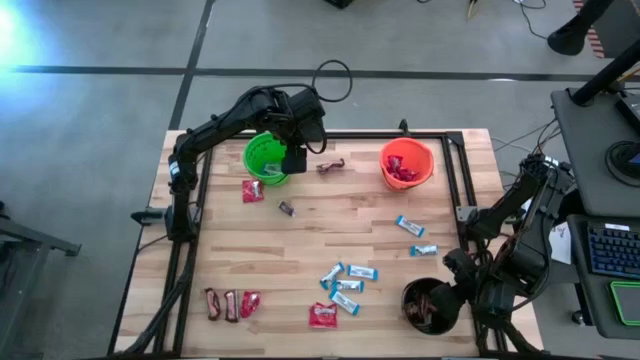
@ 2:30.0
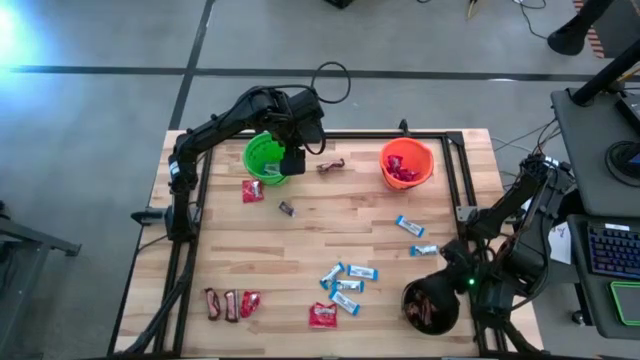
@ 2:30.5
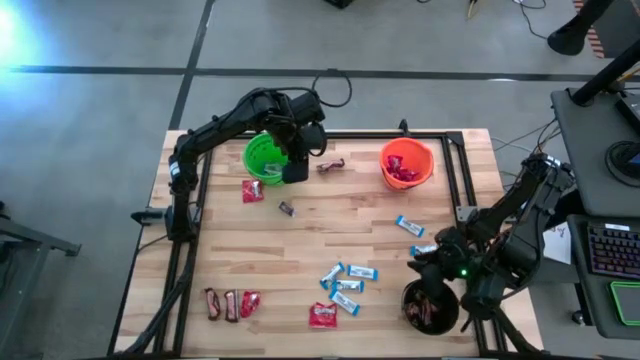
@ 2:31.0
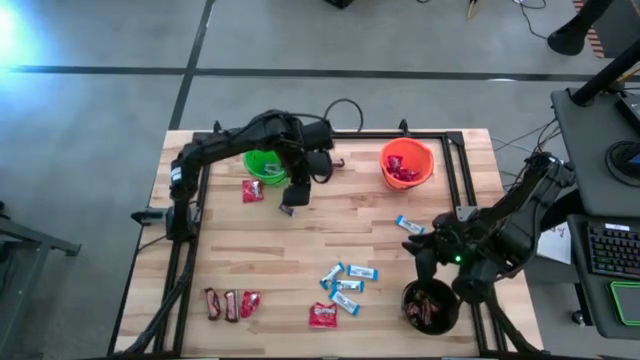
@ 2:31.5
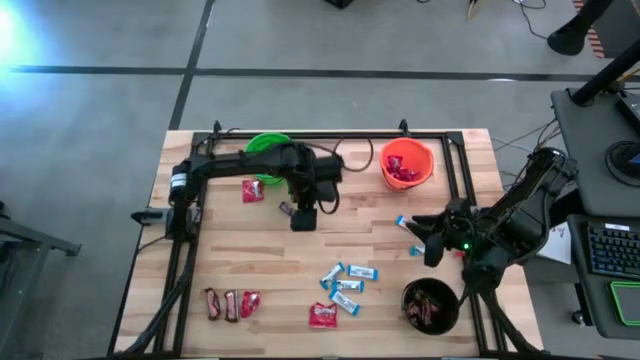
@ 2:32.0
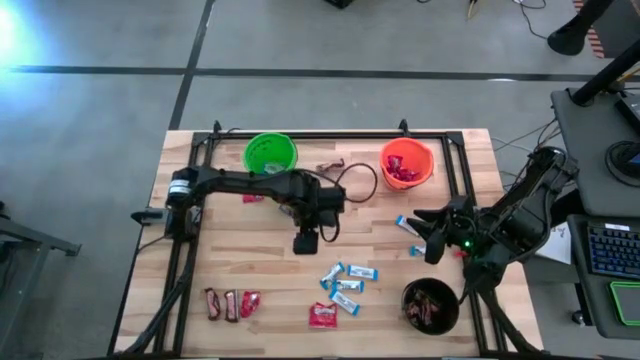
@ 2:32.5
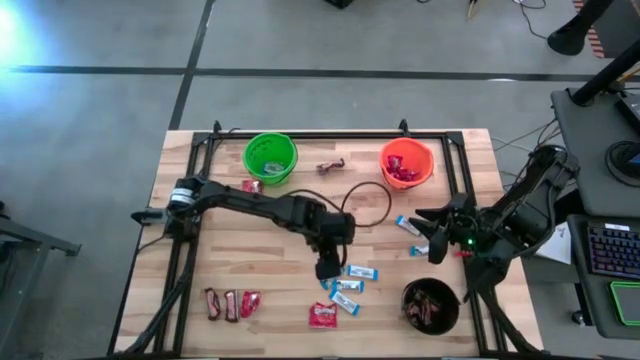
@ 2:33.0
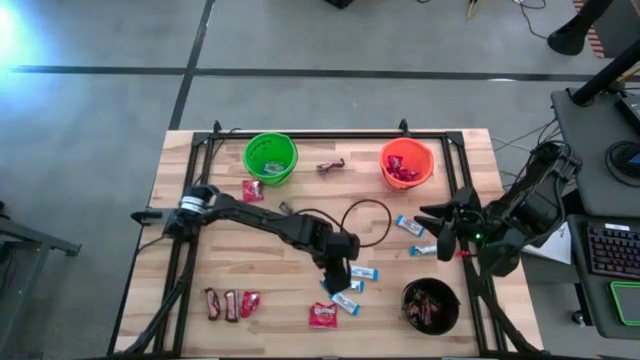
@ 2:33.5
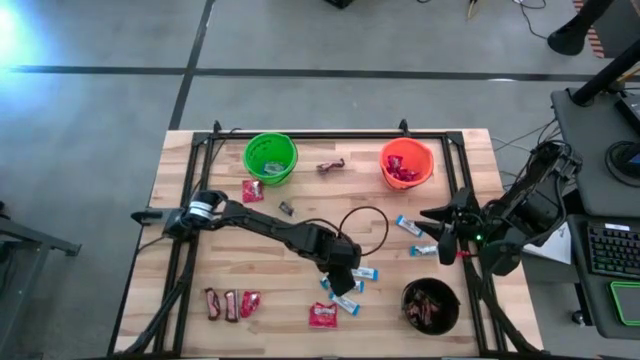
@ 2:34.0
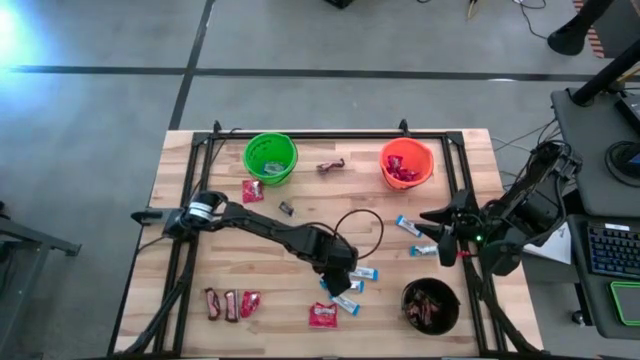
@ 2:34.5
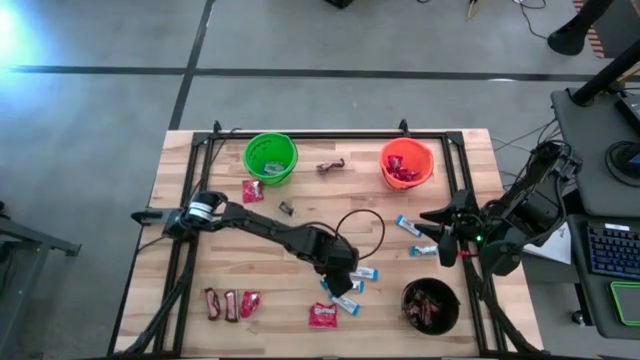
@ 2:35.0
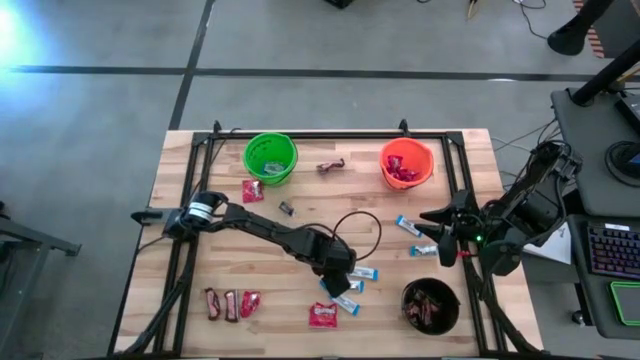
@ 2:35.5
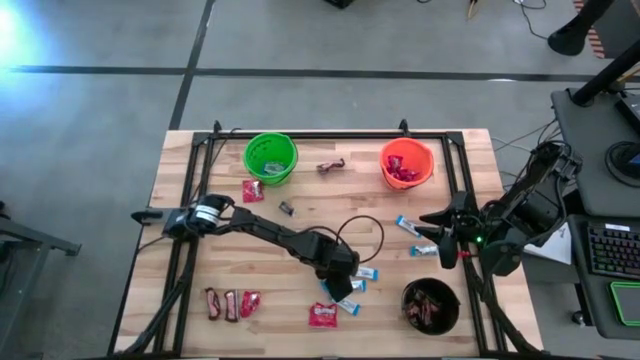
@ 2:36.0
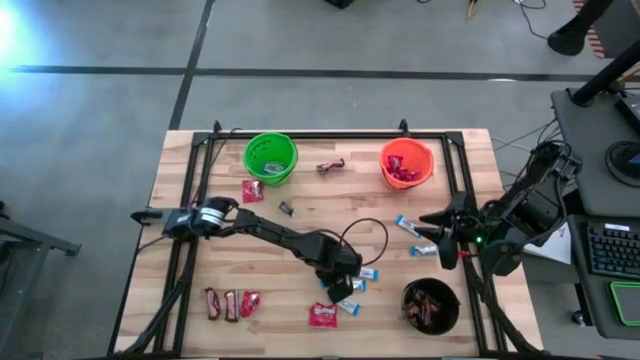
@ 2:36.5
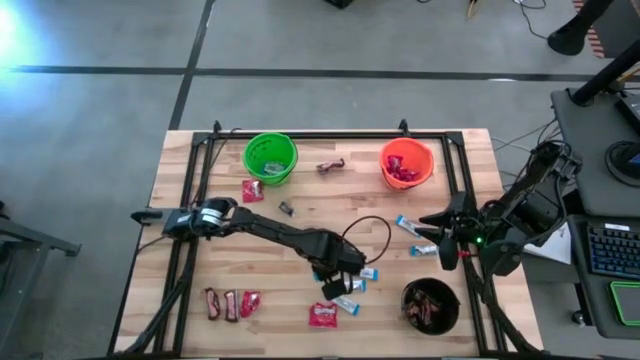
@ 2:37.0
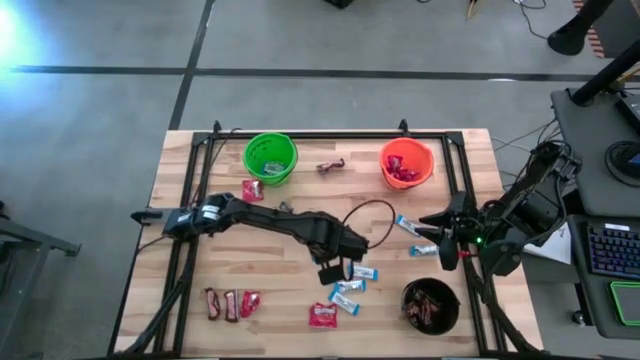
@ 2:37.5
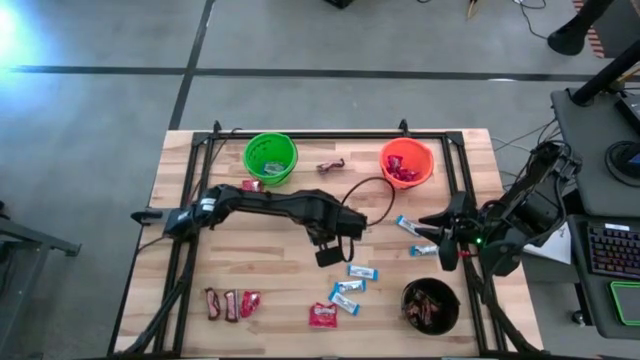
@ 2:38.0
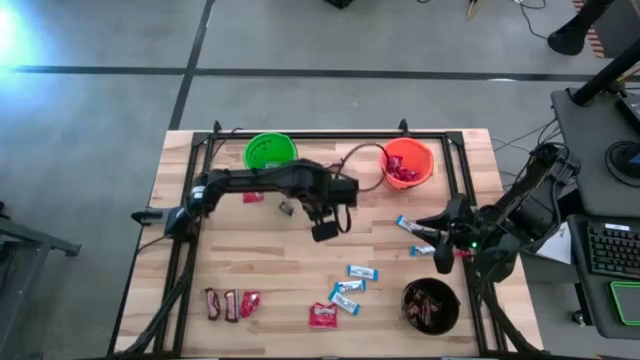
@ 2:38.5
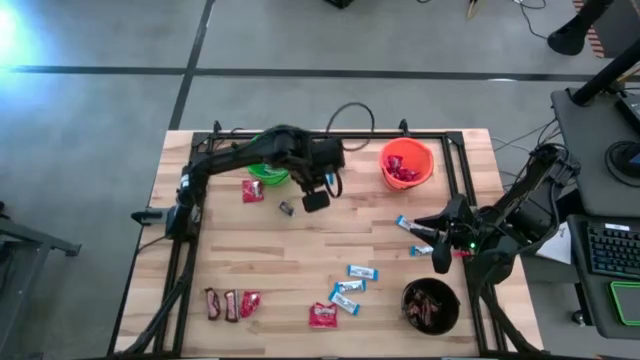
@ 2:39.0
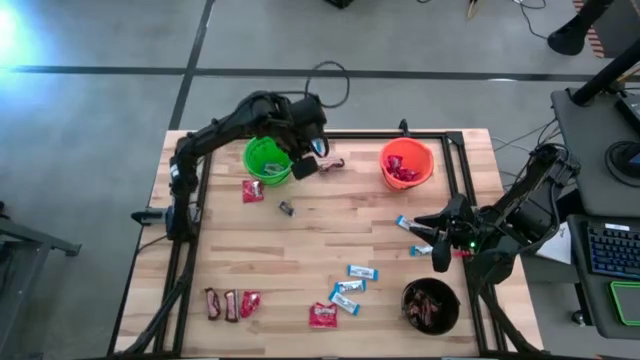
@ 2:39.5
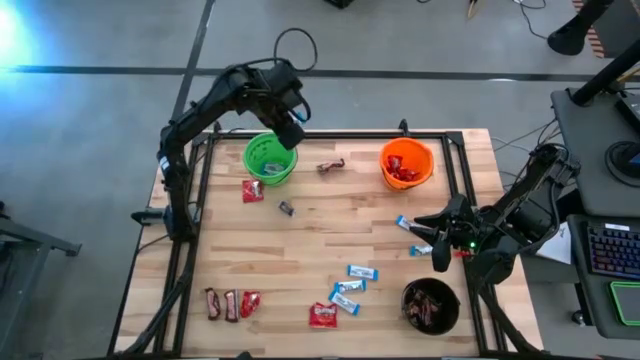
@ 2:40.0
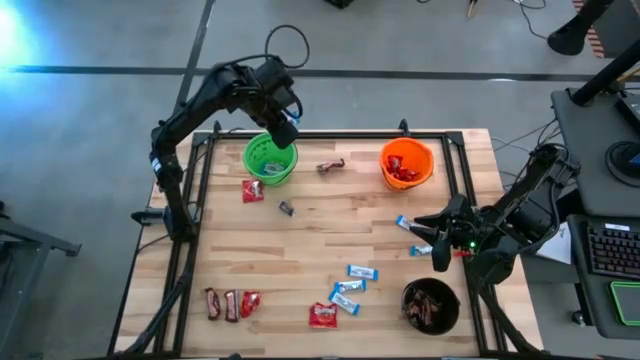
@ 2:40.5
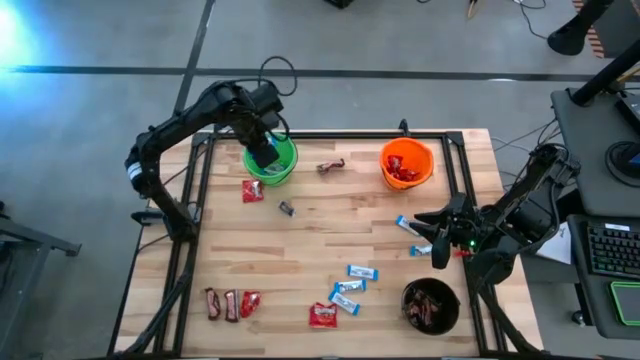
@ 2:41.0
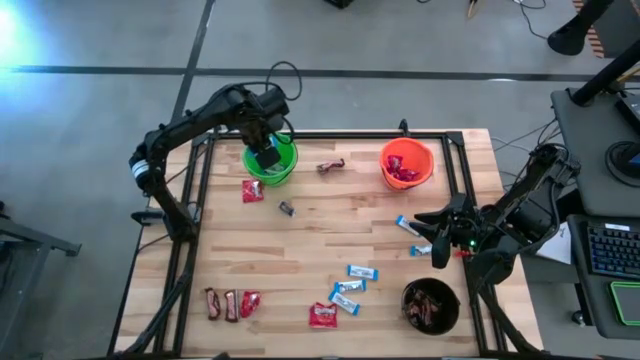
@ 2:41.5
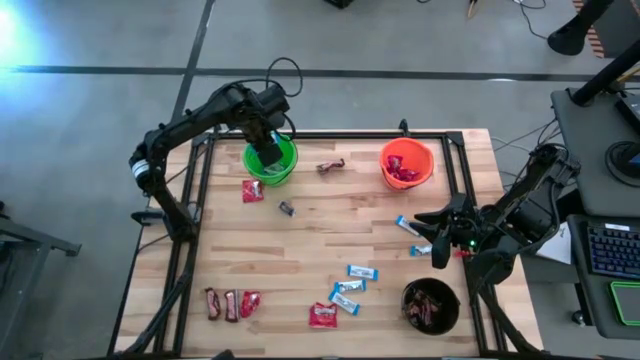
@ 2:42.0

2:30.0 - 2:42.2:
Task: Sort candy
Put the white candy into the green bucket

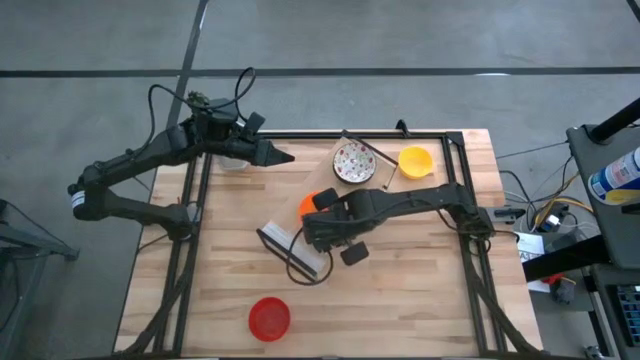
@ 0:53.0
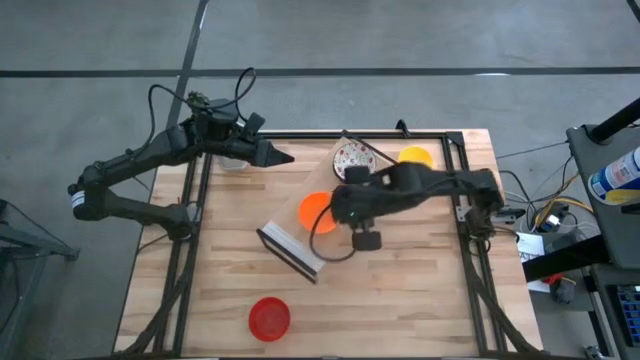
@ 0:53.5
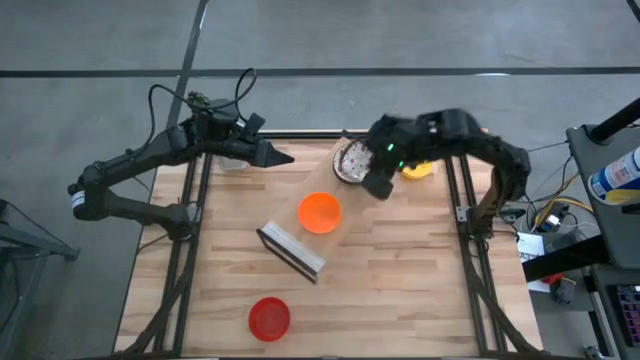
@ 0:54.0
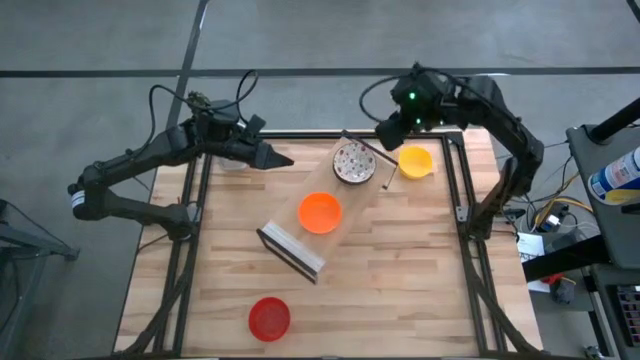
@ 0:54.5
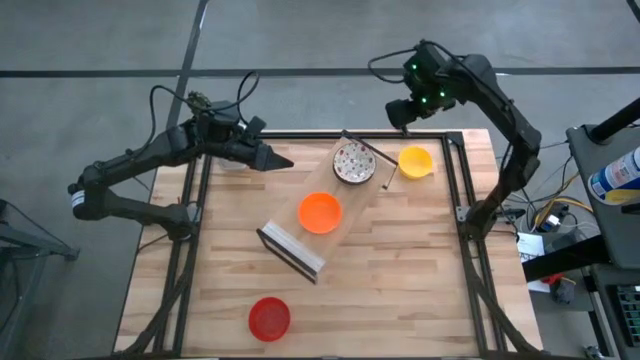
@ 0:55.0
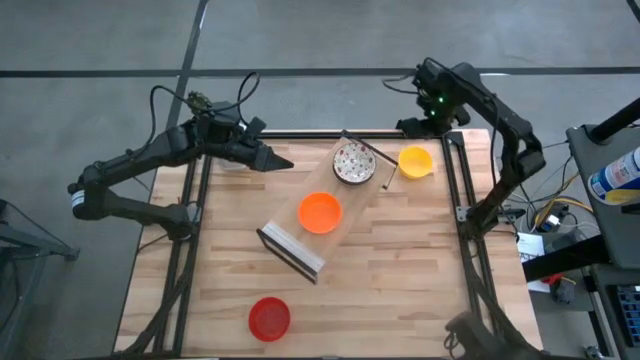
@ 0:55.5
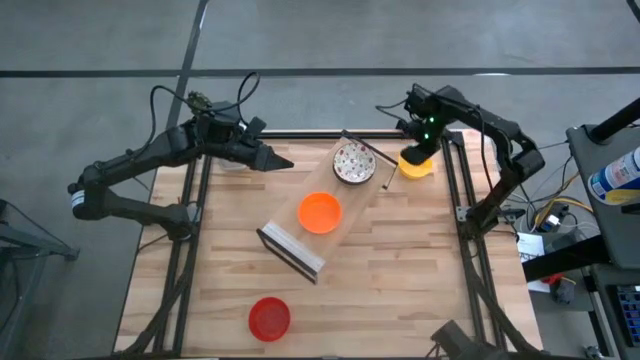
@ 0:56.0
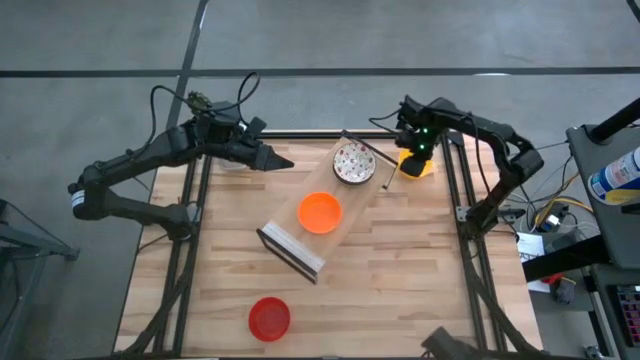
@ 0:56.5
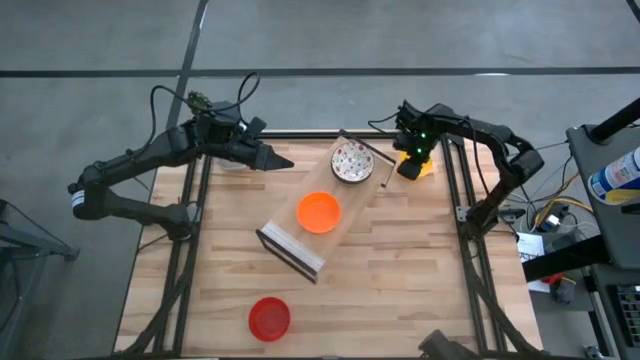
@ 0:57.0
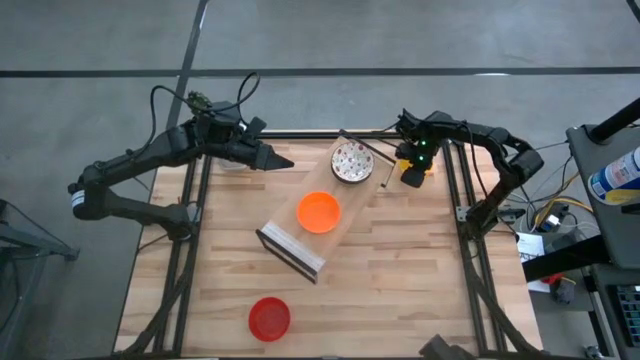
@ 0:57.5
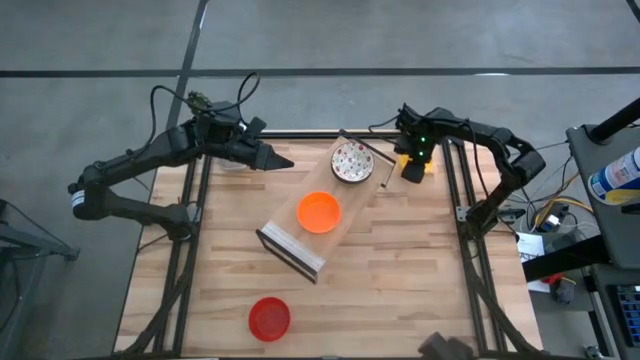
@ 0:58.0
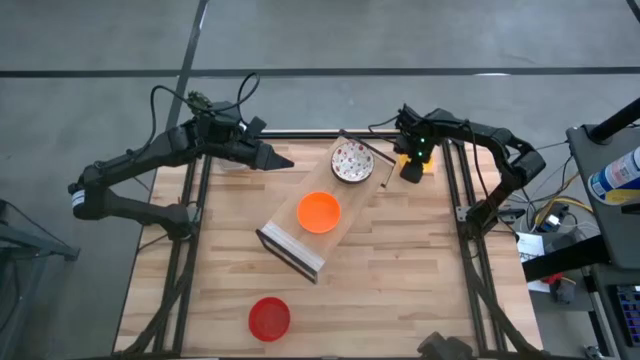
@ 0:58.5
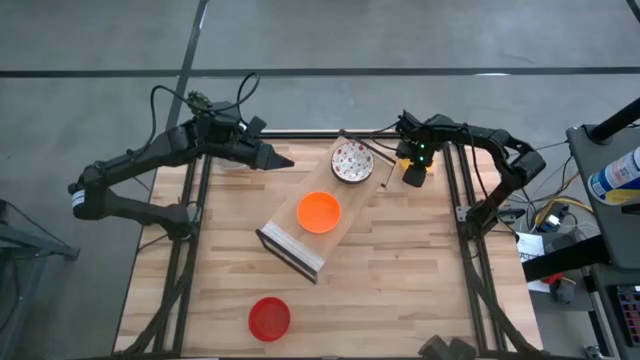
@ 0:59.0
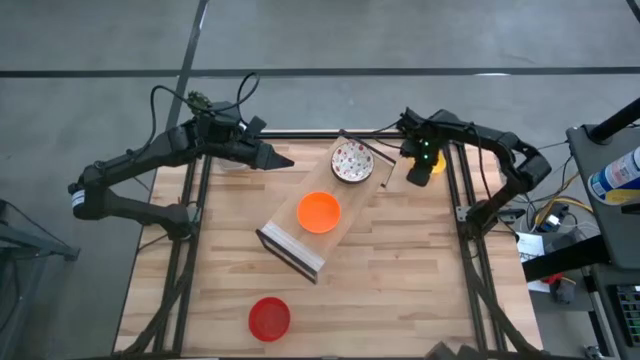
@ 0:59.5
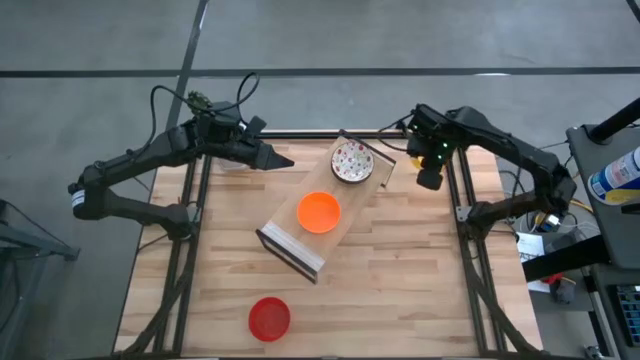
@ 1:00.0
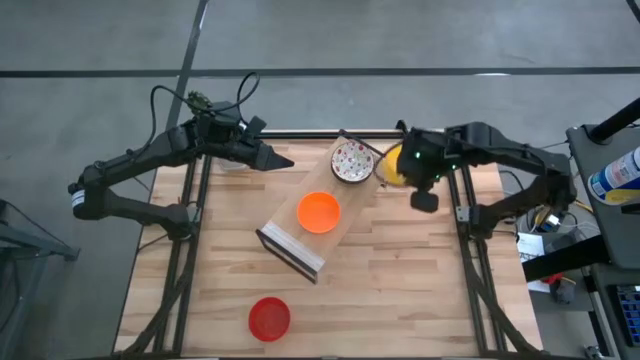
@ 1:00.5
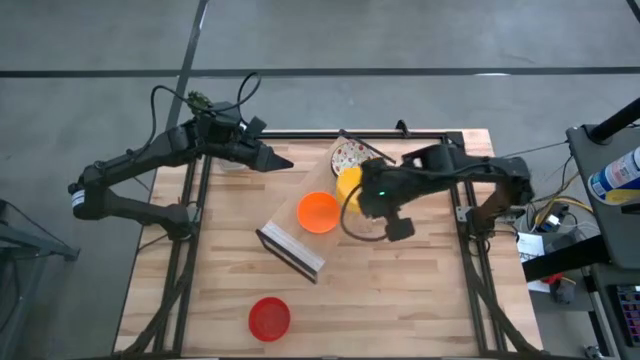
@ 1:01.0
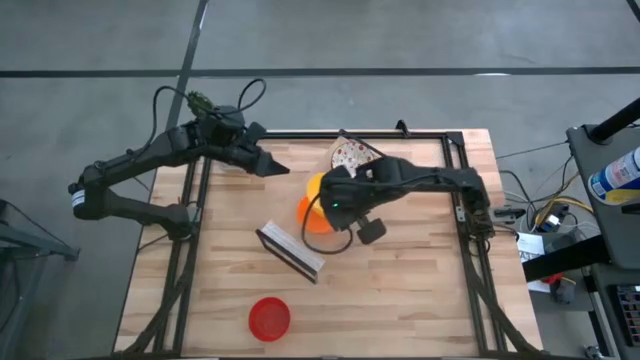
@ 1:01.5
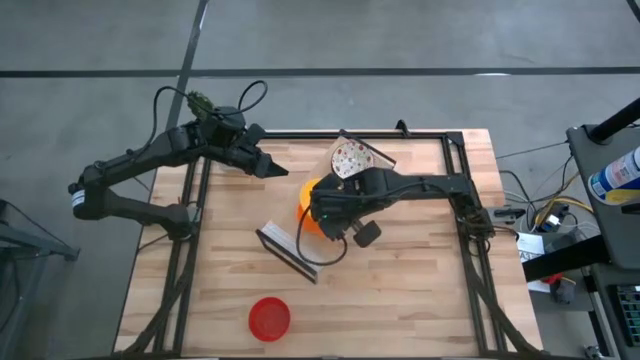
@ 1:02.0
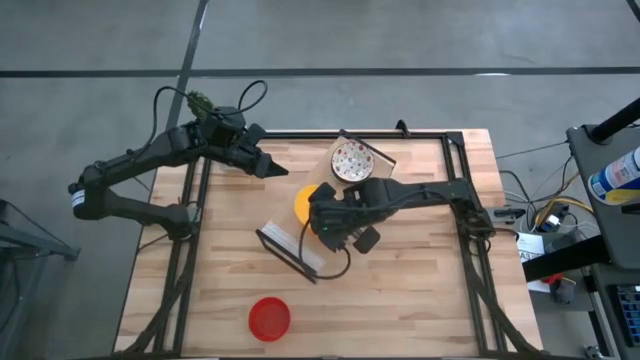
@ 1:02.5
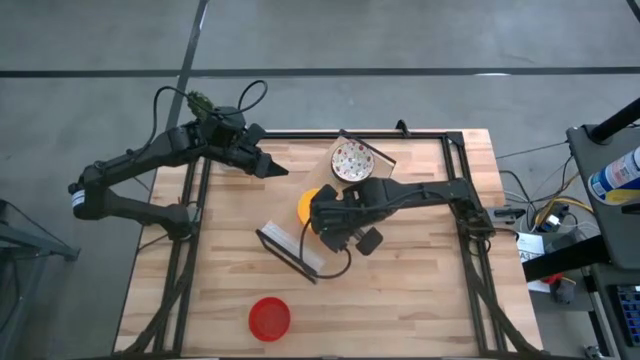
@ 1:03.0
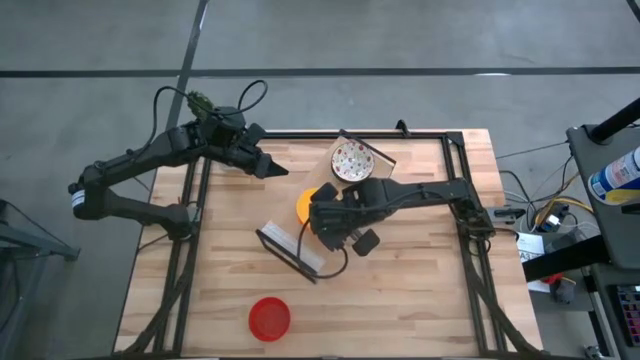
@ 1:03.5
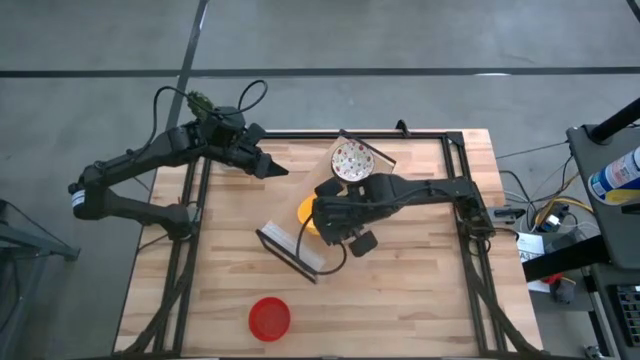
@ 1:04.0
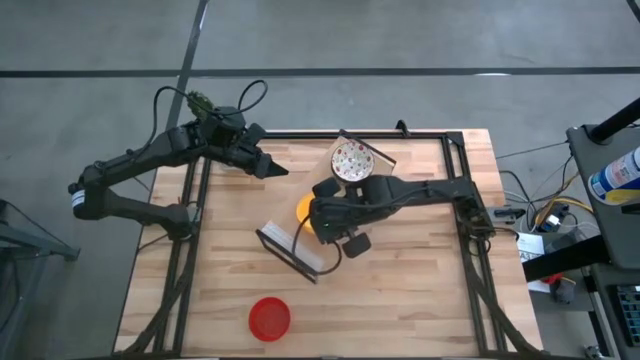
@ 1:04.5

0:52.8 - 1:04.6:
Task: Pick & Place Mini bowls
Stack the yellow bowl on the top of the orange bowl on the shelf
